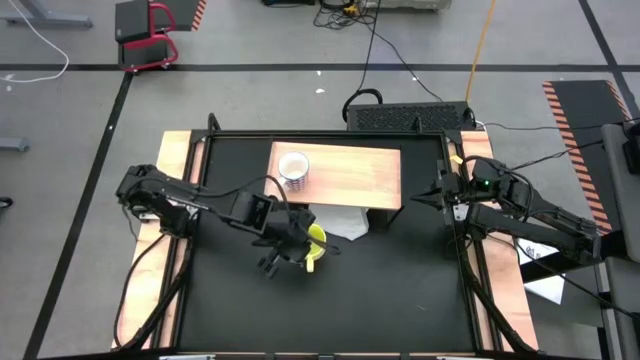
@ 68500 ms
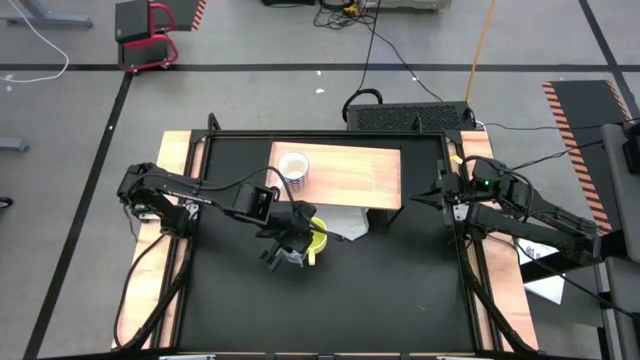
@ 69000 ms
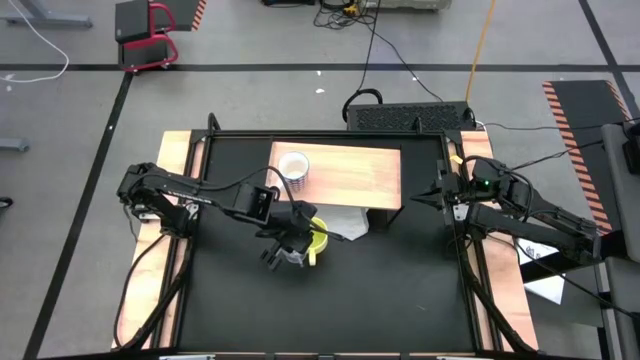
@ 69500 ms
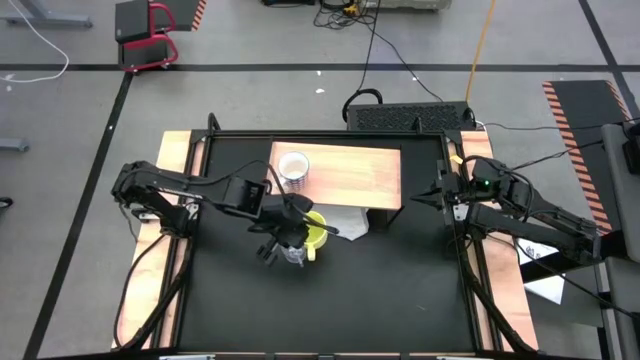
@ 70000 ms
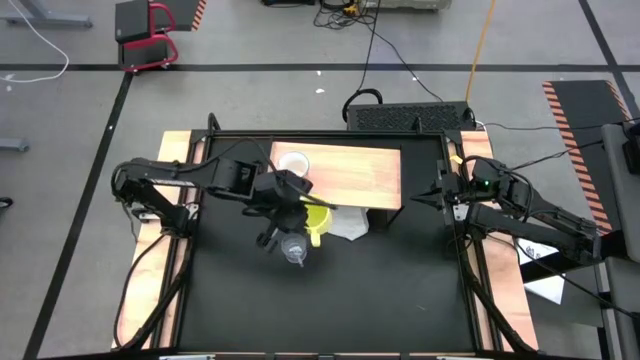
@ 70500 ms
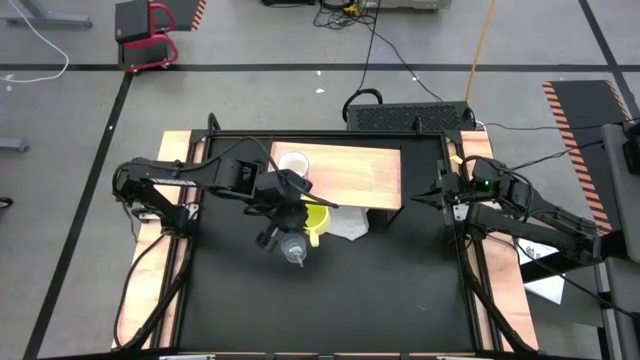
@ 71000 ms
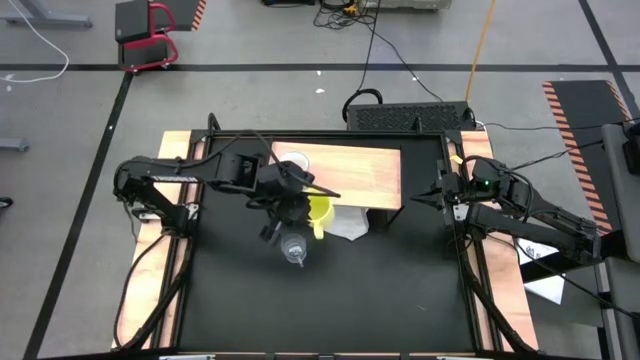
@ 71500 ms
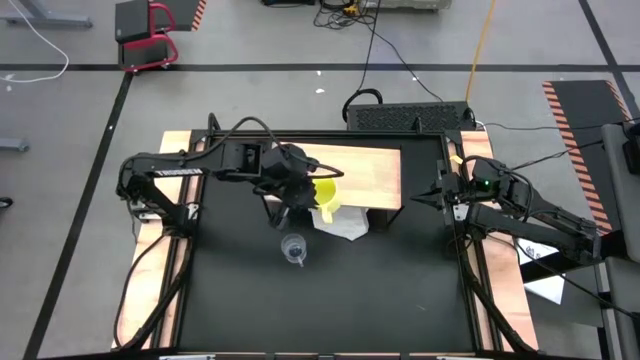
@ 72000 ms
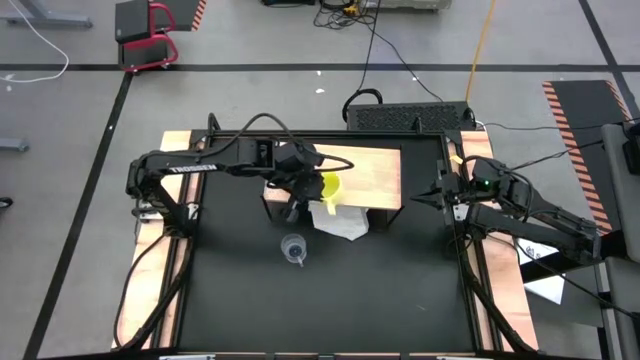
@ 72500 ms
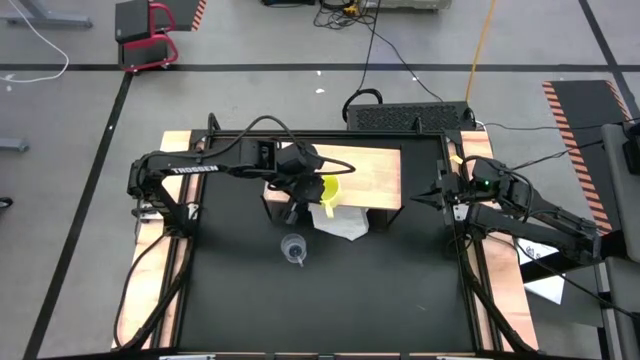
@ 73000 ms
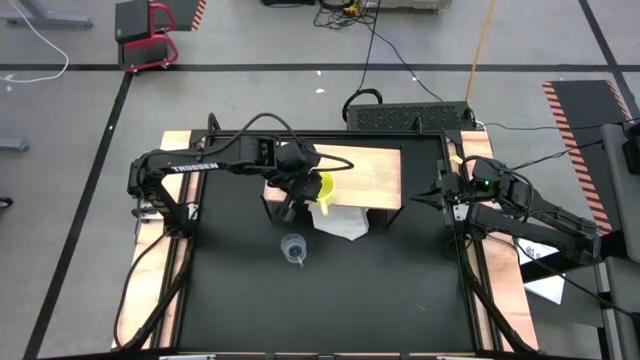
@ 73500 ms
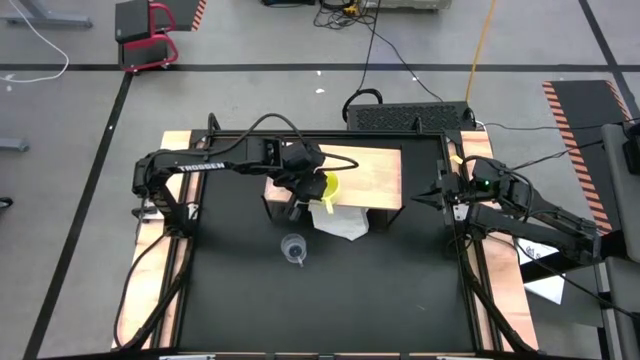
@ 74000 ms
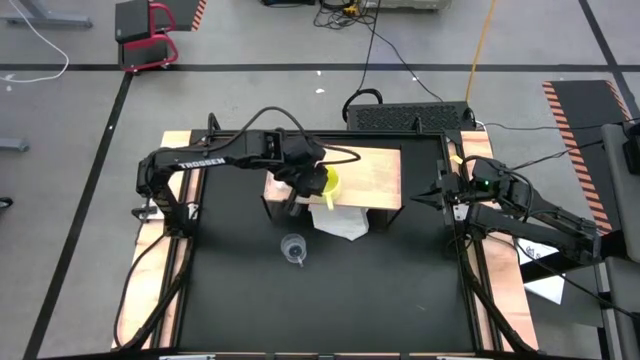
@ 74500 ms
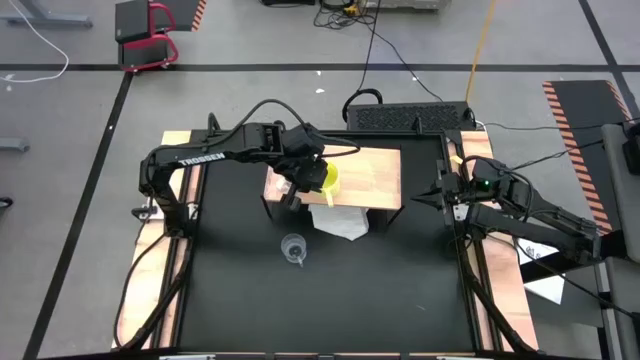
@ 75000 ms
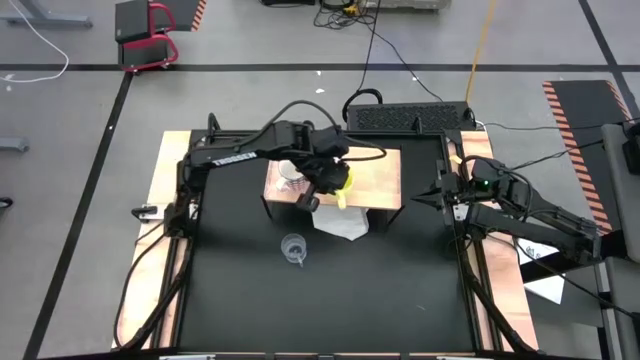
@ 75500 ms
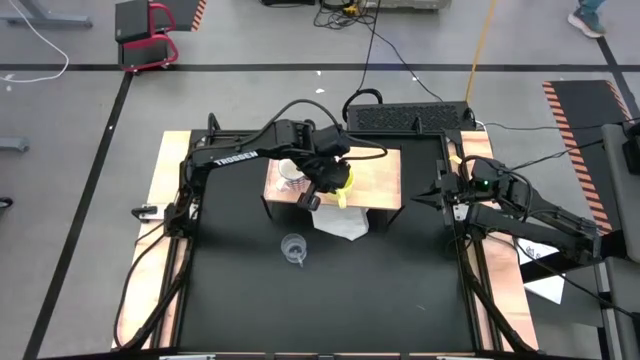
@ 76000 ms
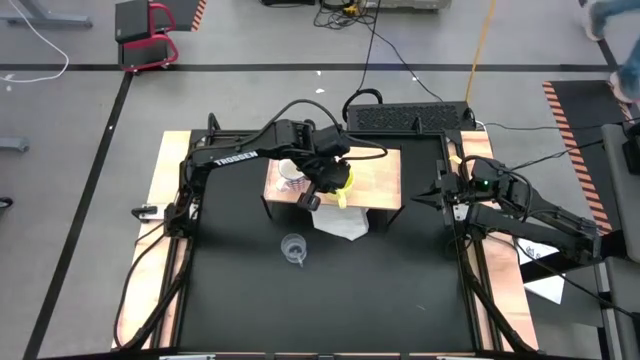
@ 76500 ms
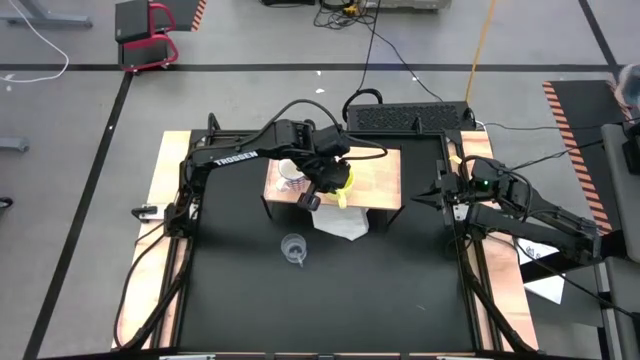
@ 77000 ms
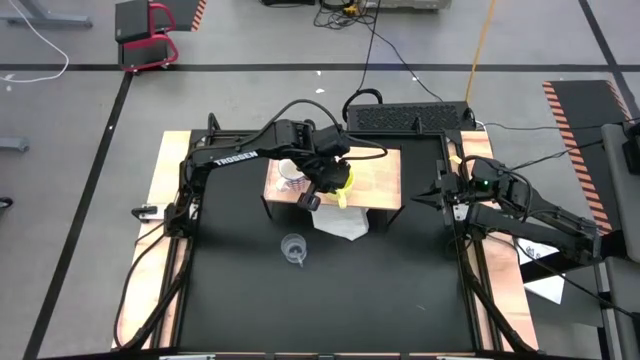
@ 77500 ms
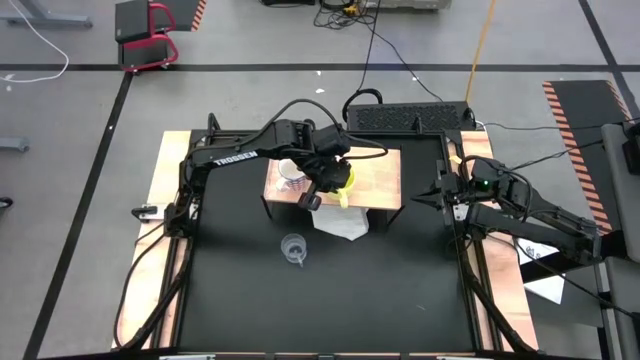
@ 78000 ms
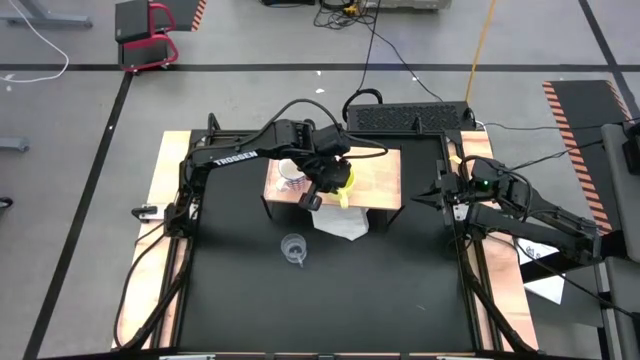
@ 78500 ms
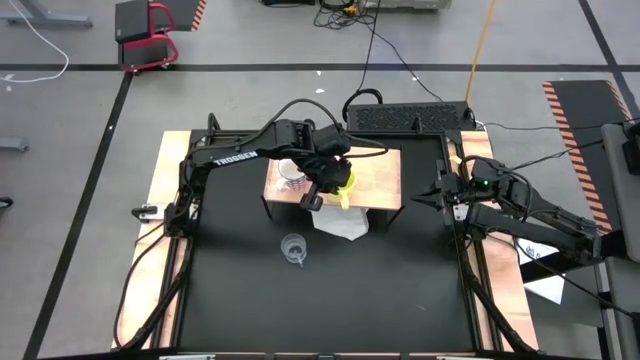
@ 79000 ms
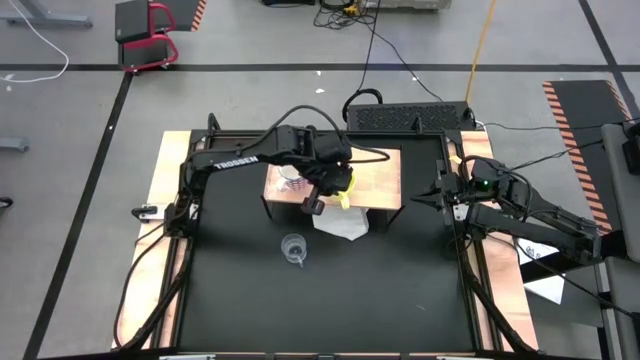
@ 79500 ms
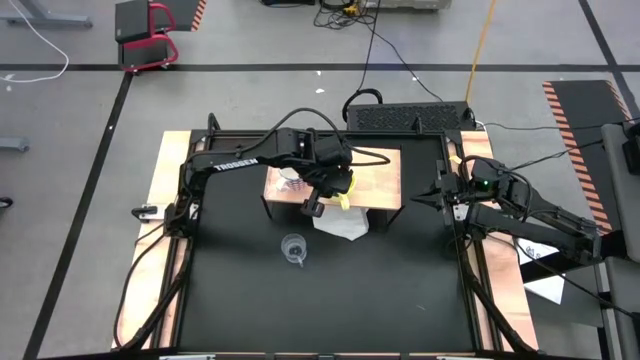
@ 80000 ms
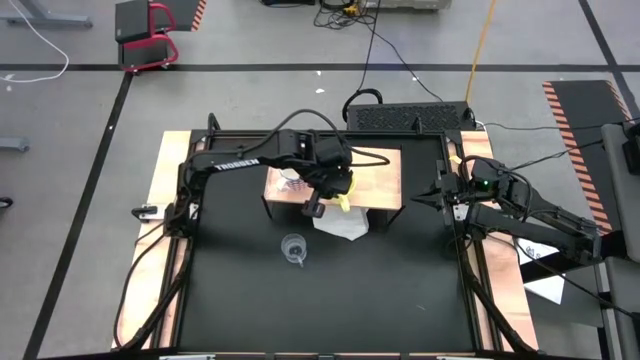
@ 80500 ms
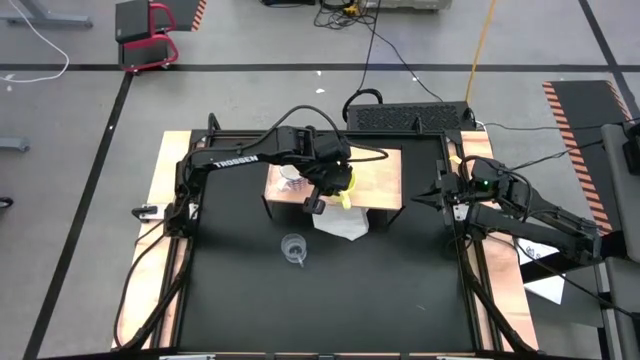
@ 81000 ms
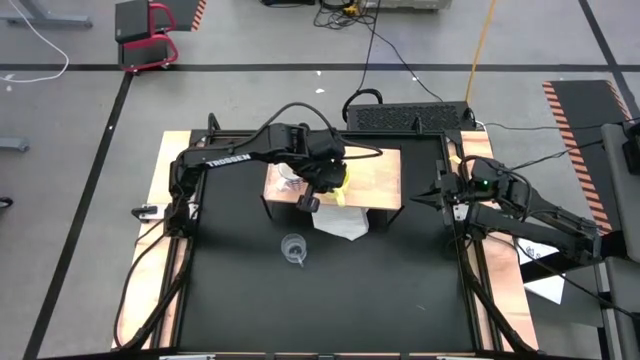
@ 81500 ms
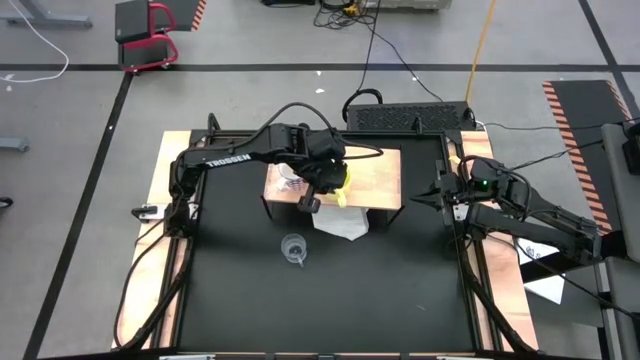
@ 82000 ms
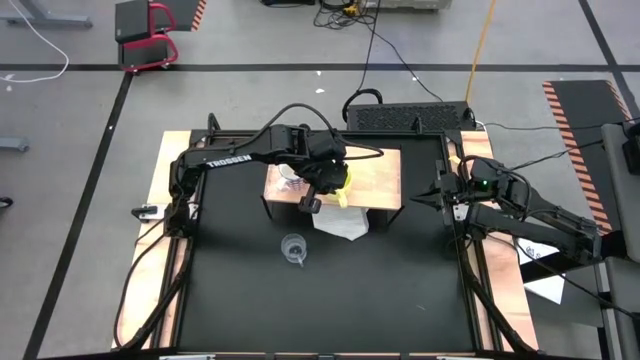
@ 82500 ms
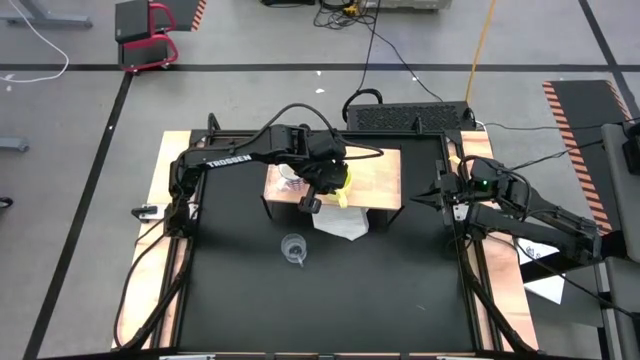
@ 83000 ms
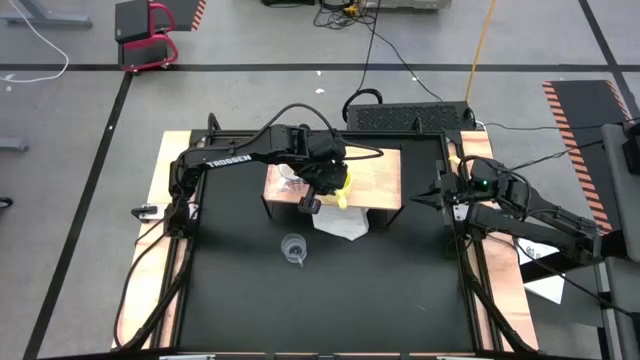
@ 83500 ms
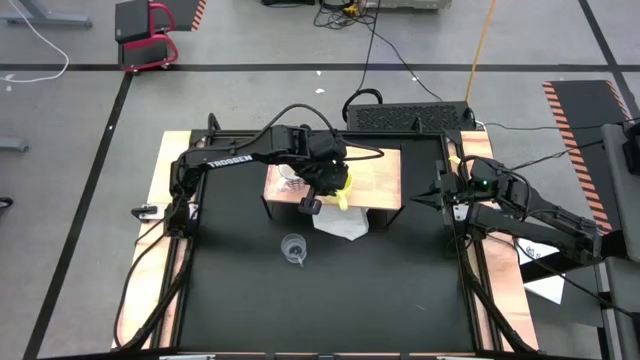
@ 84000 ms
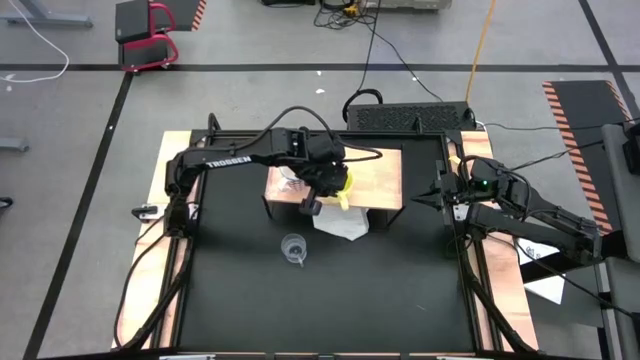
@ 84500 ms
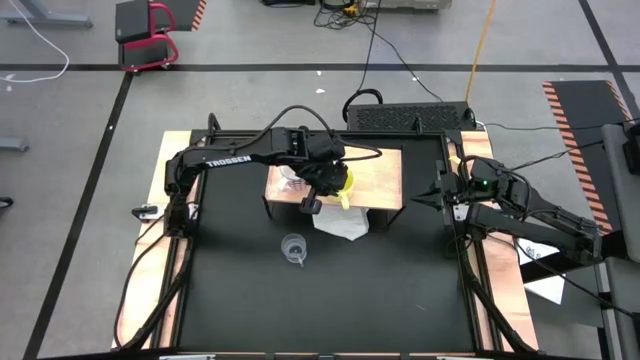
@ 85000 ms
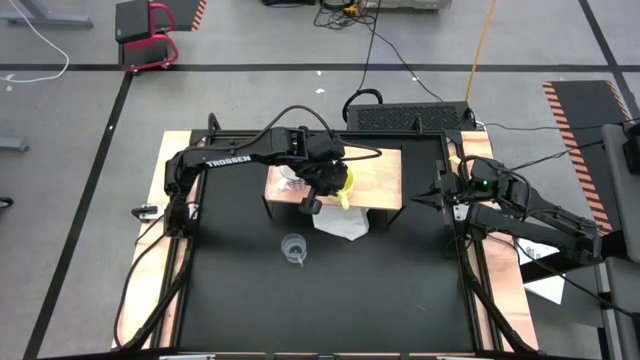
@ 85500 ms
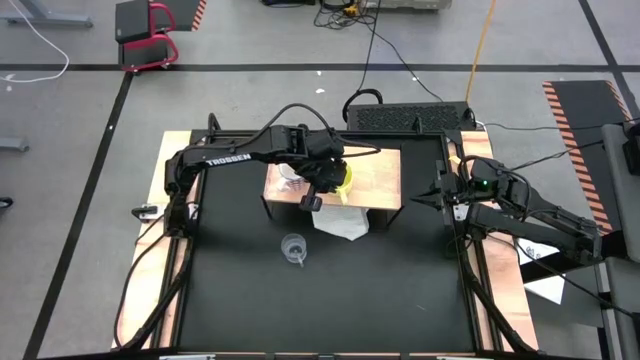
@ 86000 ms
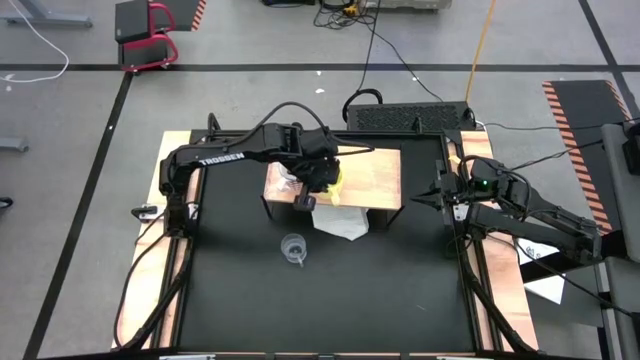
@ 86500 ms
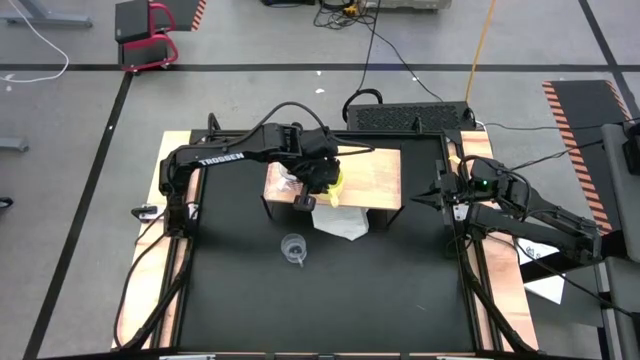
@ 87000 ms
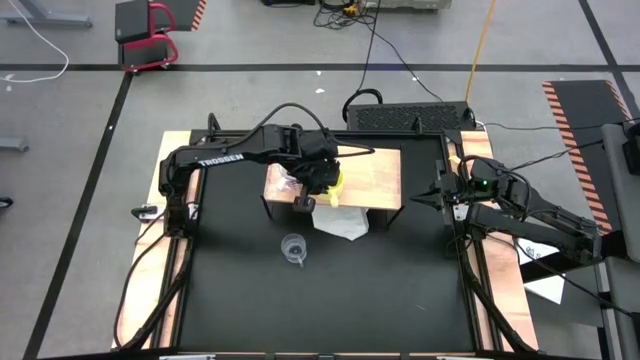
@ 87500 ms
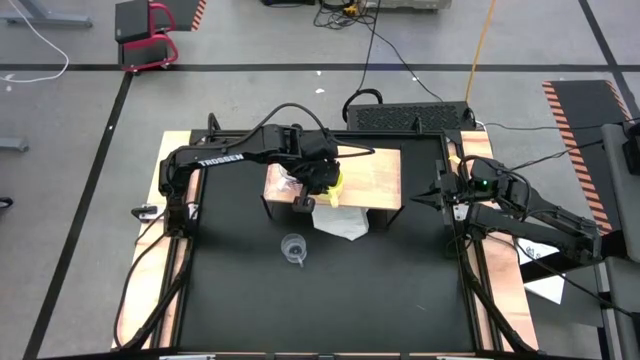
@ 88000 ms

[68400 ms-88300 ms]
Task: Stack small to large cups/mugs on shelf
Put the yellow mug on the shelf
